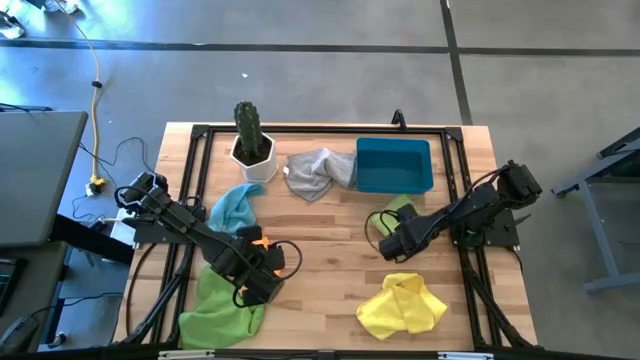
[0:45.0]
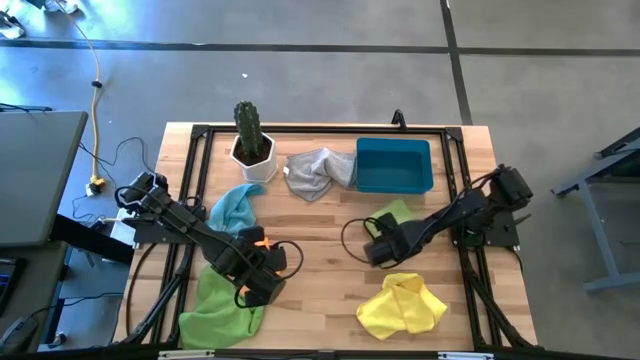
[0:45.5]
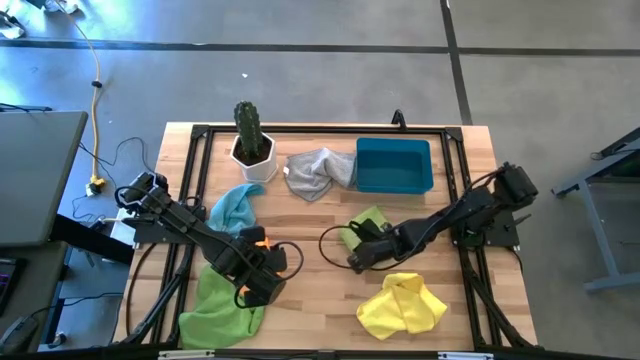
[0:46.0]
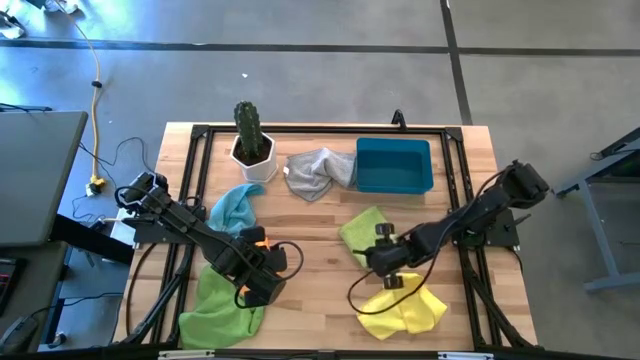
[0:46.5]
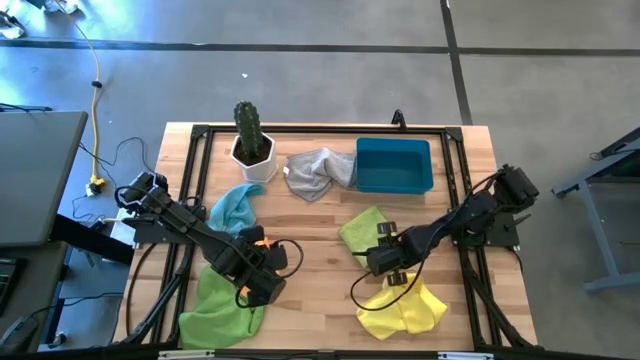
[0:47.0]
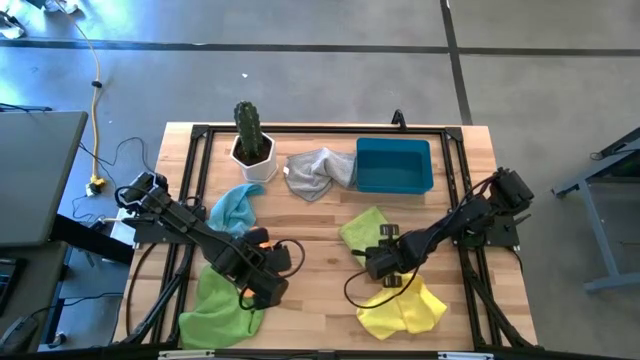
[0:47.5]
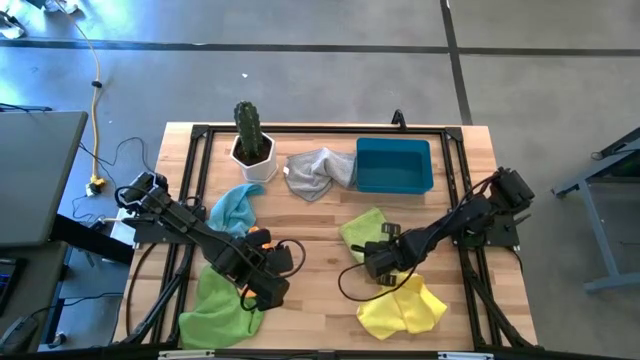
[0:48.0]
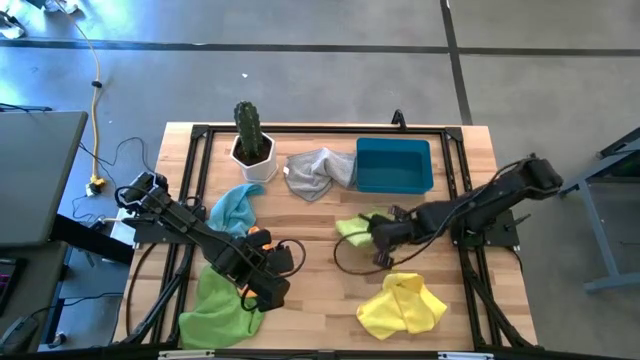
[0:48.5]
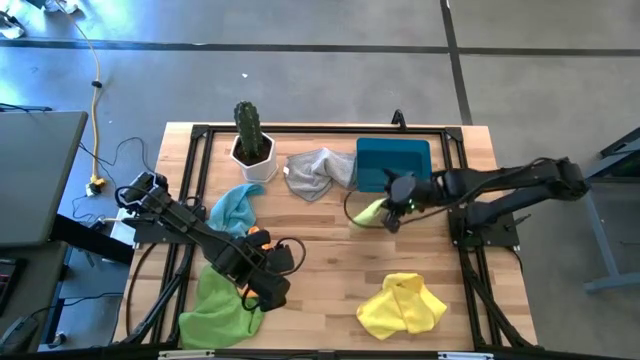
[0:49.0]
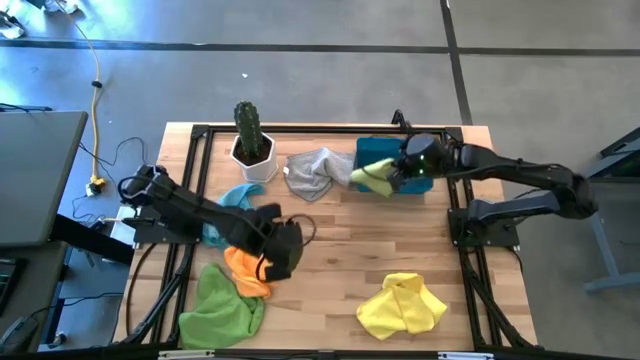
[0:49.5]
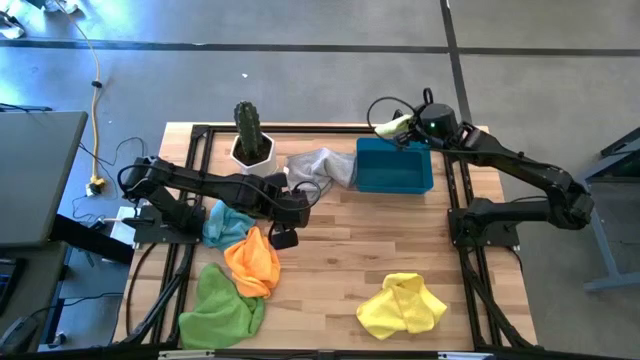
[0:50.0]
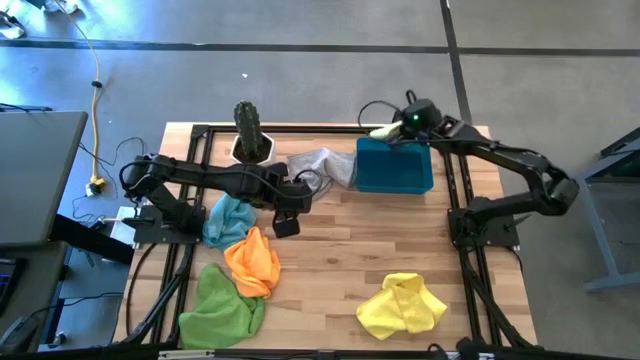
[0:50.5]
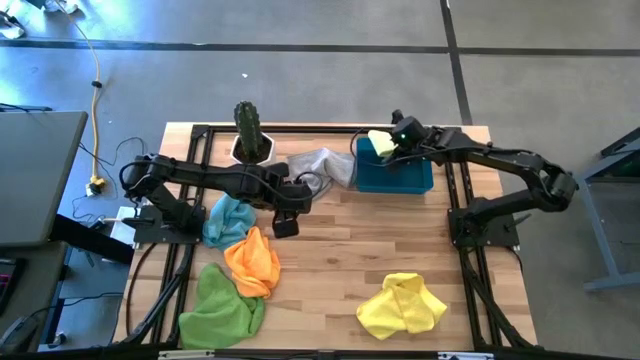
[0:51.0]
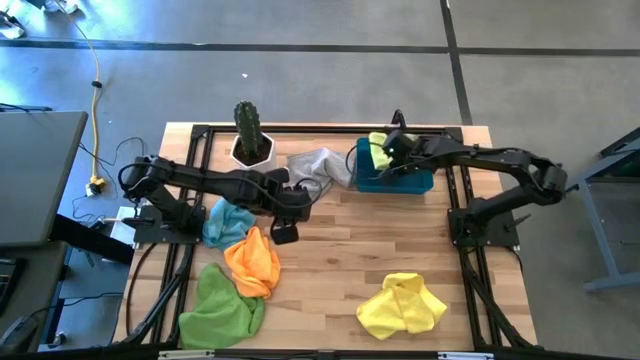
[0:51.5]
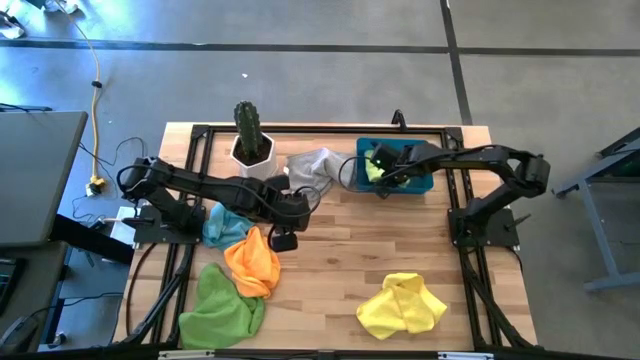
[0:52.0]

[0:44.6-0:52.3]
Task: Fold microfiber towels
Put the folded light green microfiber cloth into the blue bin

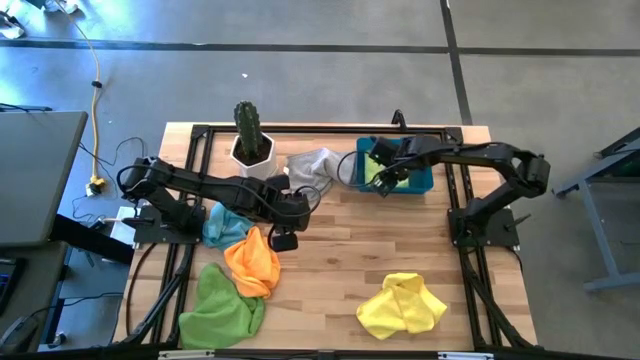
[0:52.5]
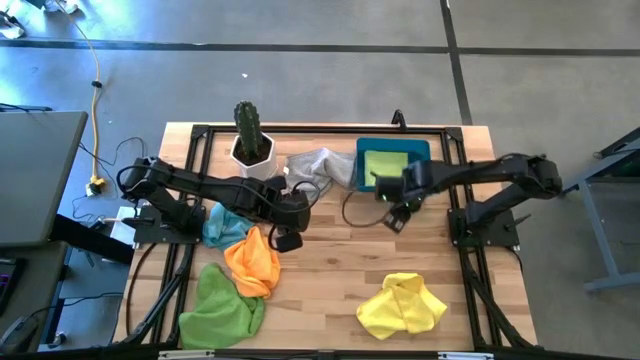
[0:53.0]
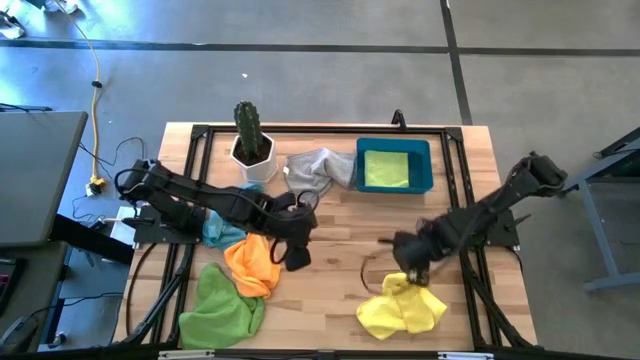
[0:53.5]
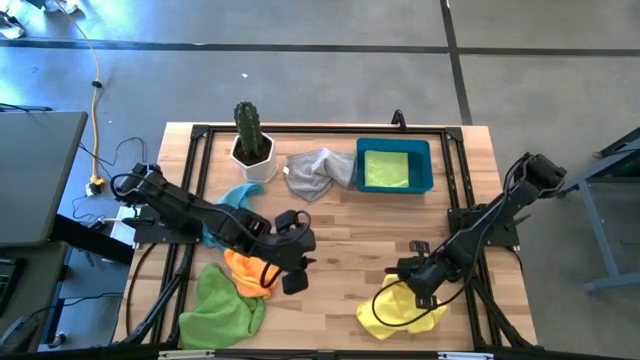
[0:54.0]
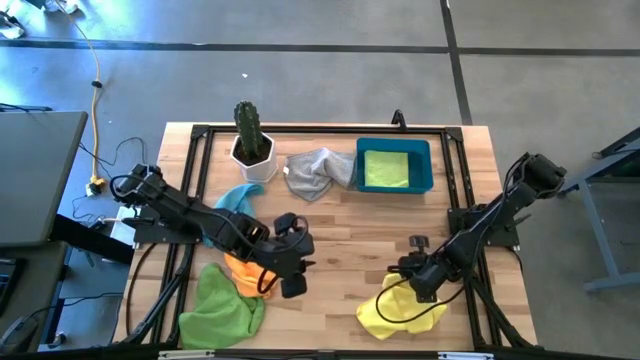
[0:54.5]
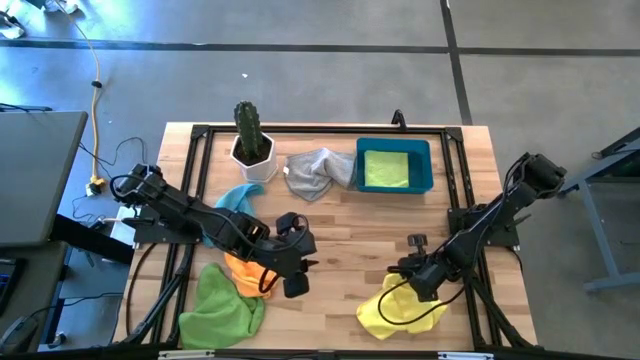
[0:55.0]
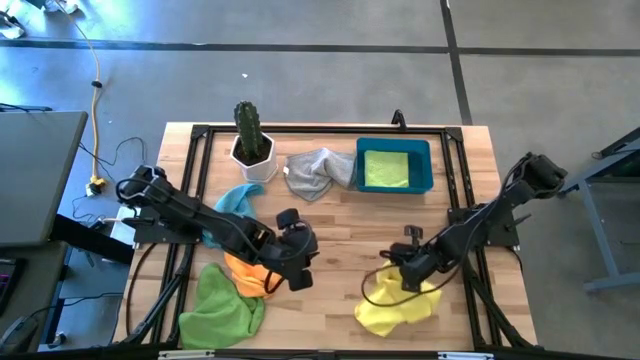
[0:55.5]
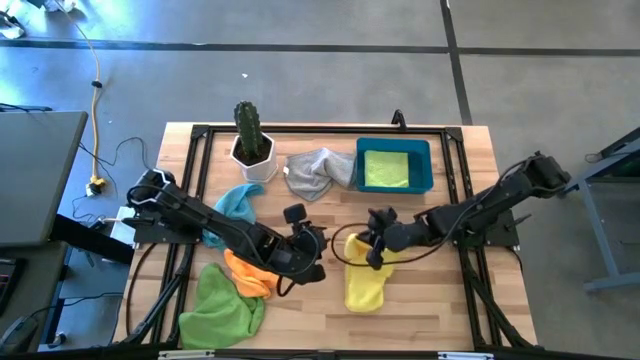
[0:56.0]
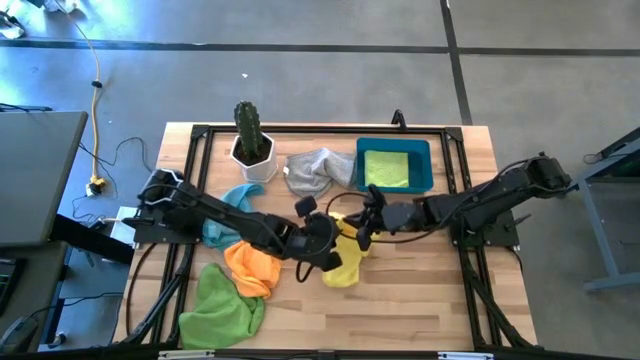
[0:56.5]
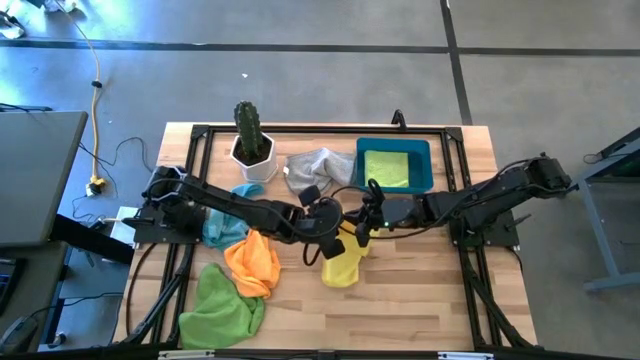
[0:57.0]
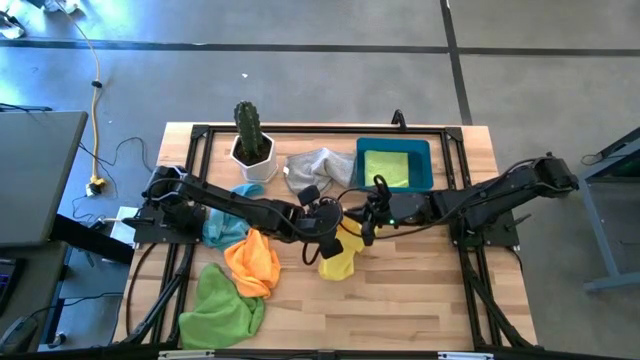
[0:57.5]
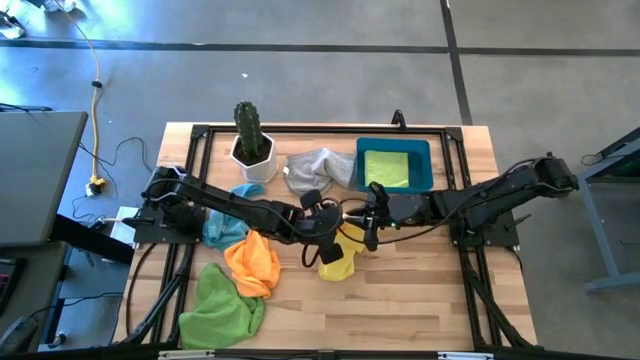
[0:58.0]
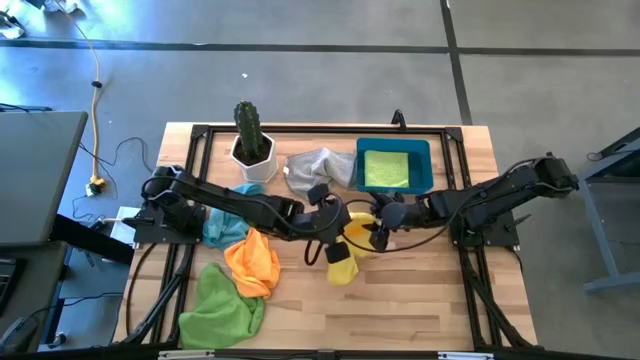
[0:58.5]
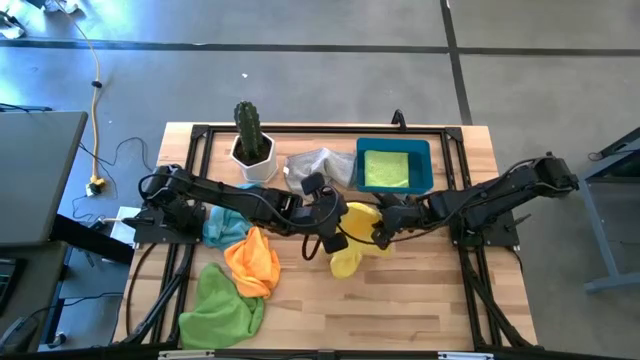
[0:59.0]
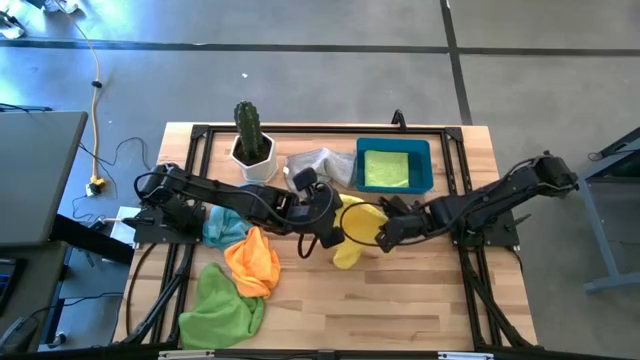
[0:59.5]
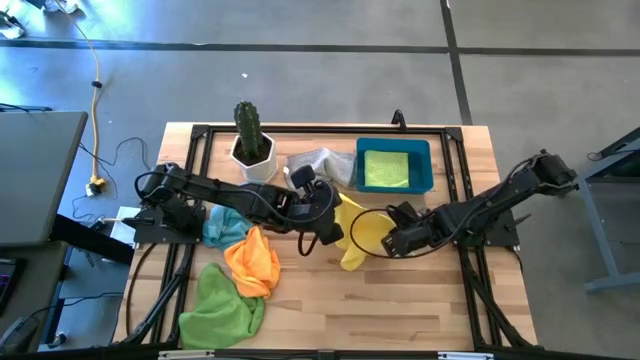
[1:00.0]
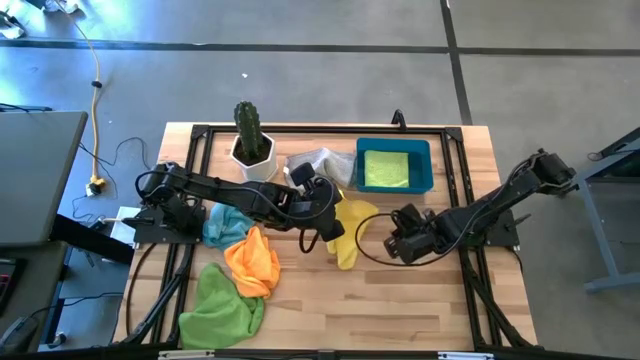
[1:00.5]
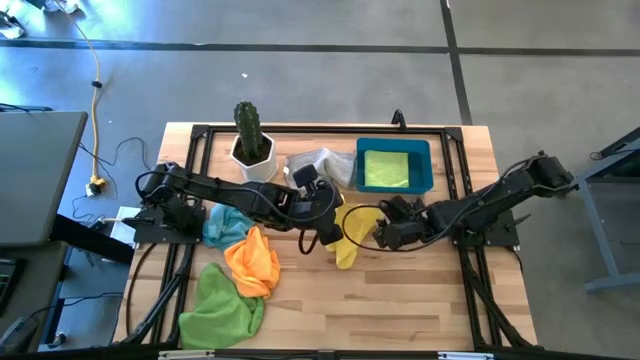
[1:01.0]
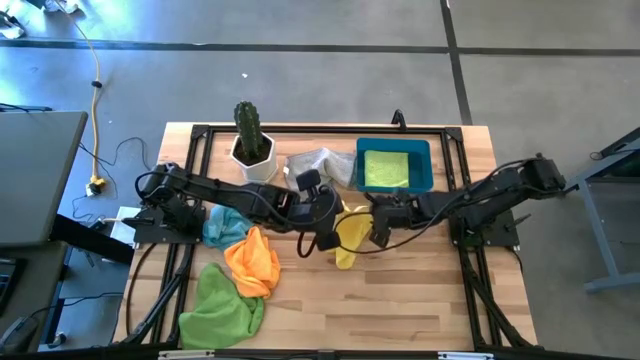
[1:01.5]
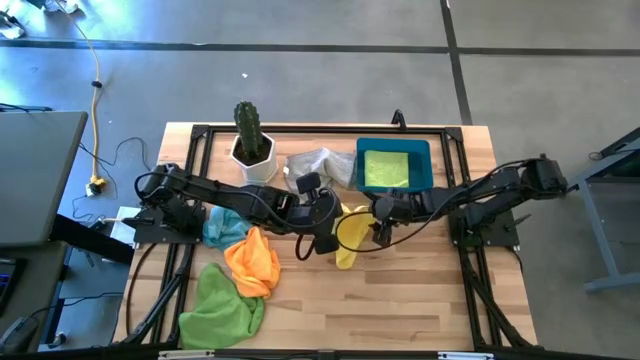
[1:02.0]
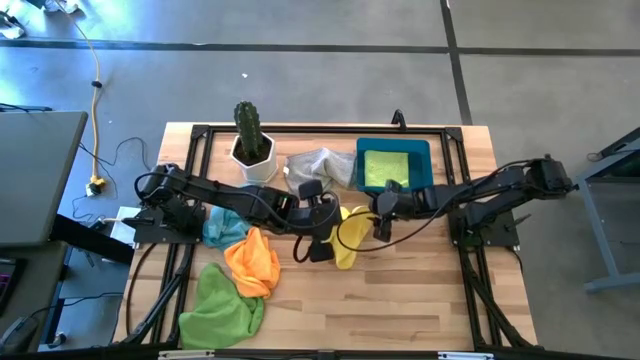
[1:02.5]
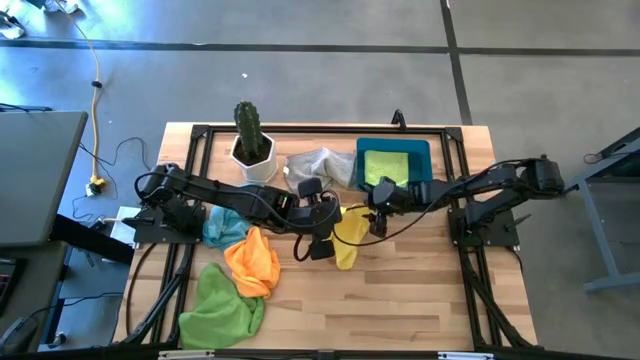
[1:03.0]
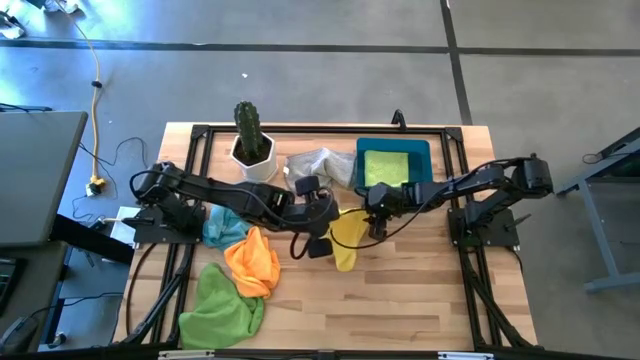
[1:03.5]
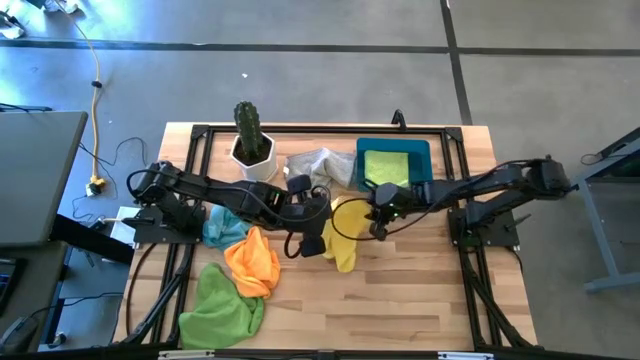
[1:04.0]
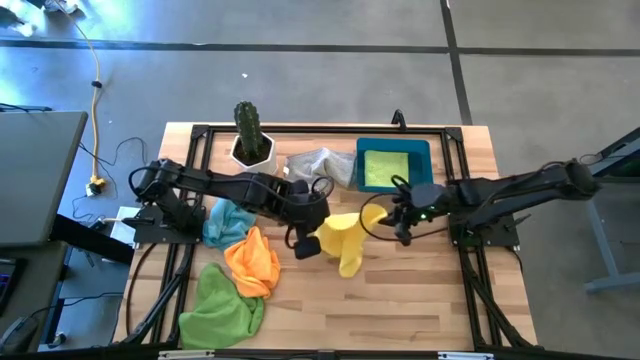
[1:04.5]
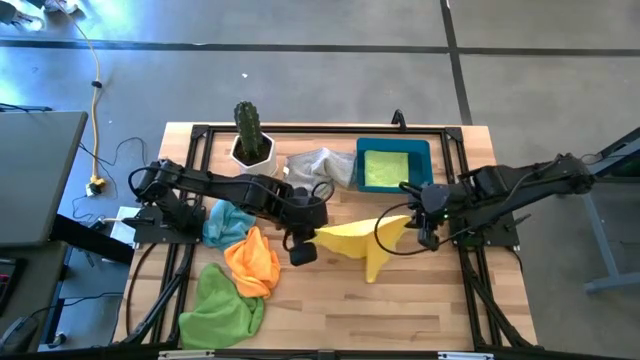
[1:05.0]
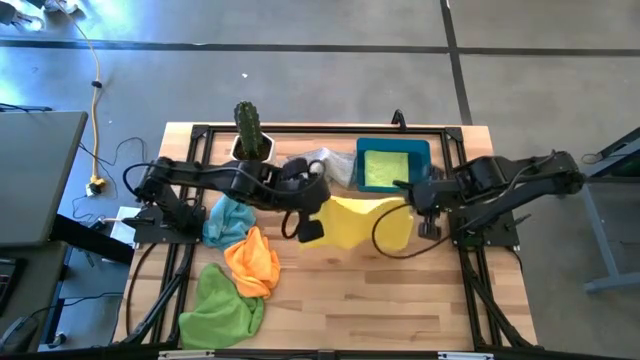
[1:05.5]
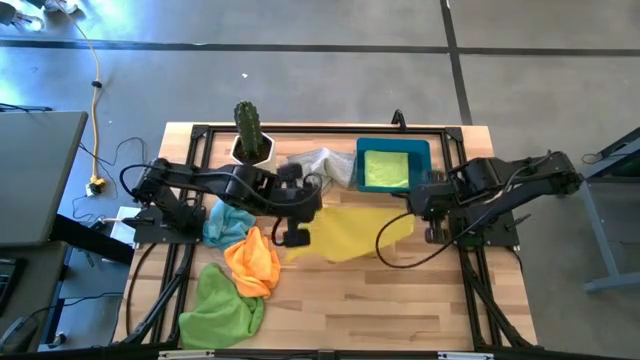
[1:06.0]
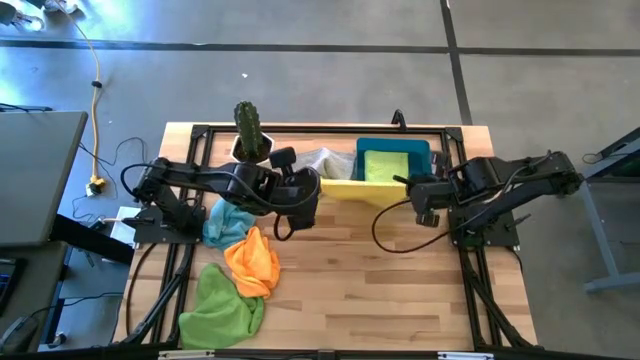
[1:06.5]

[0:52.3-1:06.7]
Fold the yellow microfiber cloth
